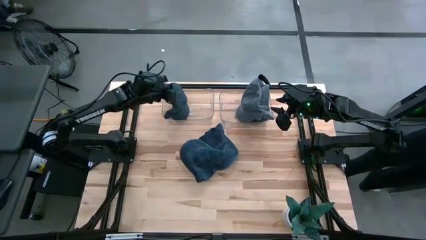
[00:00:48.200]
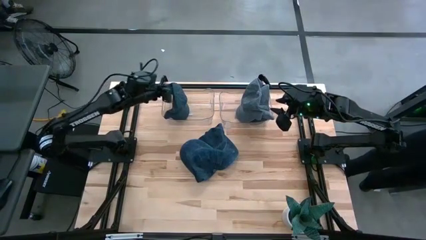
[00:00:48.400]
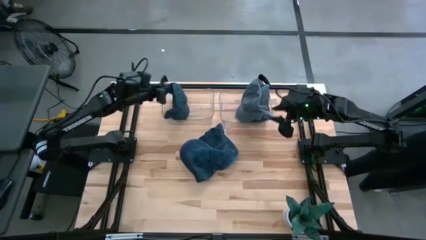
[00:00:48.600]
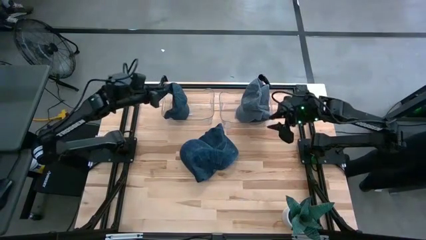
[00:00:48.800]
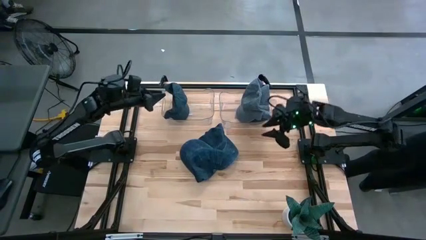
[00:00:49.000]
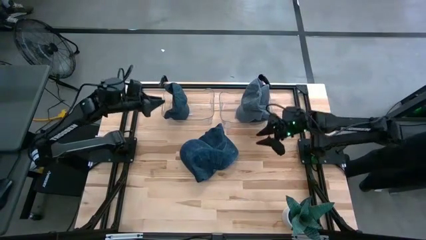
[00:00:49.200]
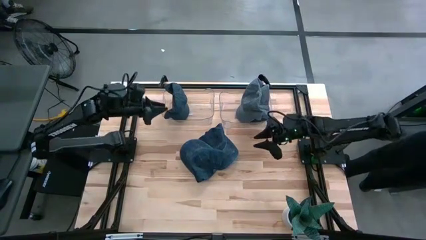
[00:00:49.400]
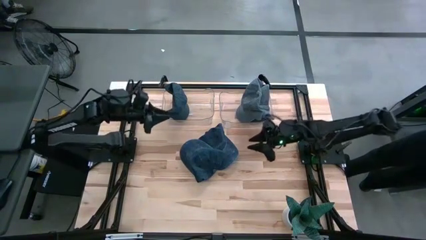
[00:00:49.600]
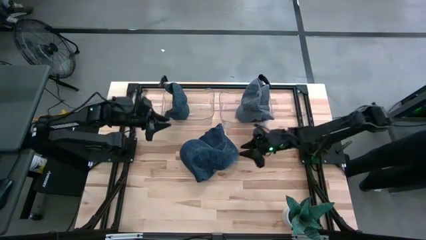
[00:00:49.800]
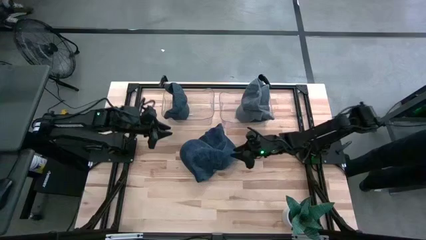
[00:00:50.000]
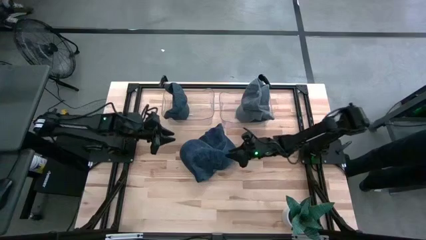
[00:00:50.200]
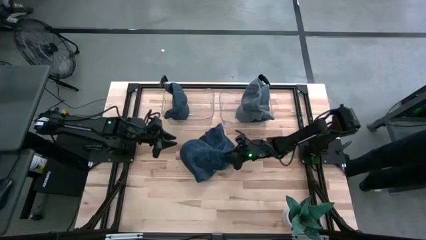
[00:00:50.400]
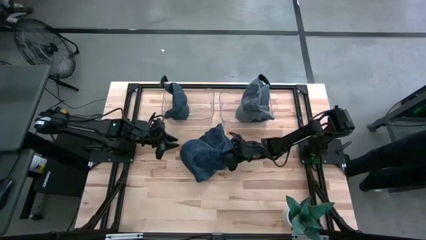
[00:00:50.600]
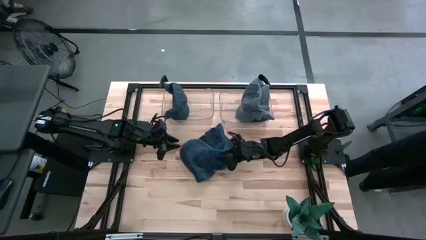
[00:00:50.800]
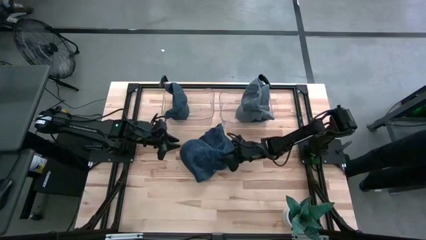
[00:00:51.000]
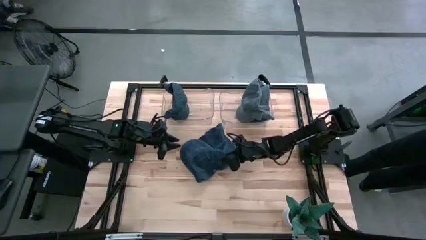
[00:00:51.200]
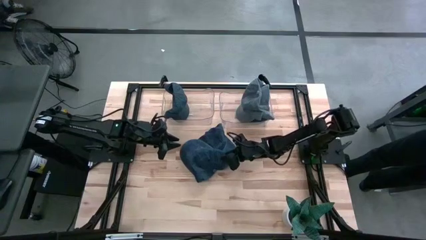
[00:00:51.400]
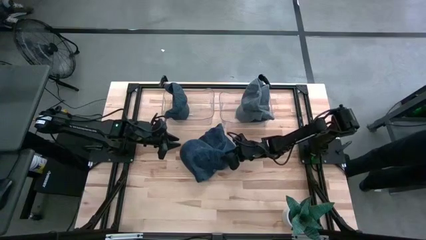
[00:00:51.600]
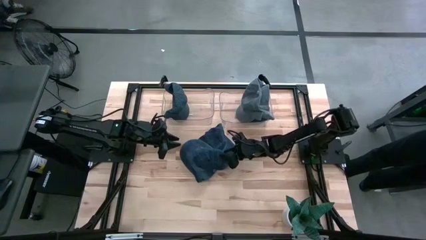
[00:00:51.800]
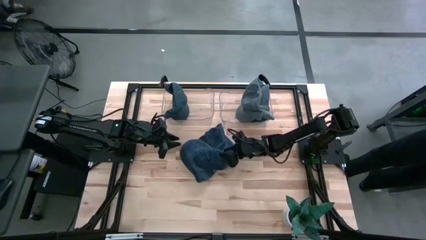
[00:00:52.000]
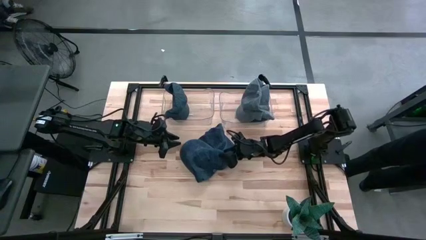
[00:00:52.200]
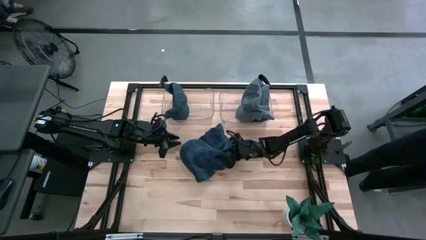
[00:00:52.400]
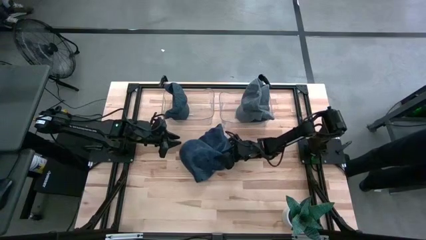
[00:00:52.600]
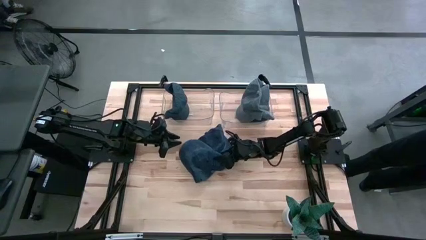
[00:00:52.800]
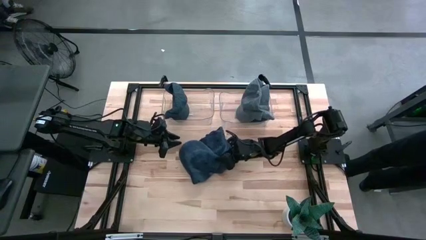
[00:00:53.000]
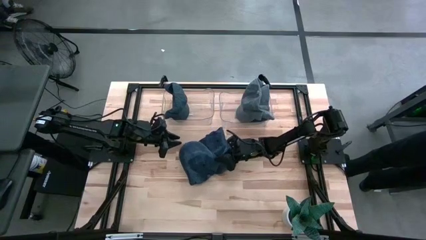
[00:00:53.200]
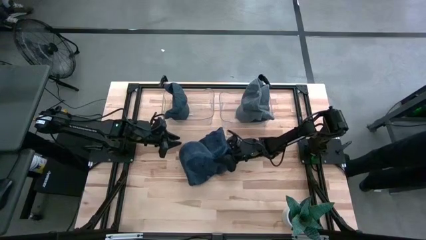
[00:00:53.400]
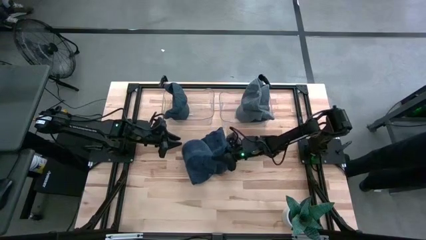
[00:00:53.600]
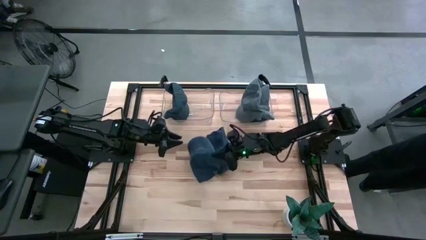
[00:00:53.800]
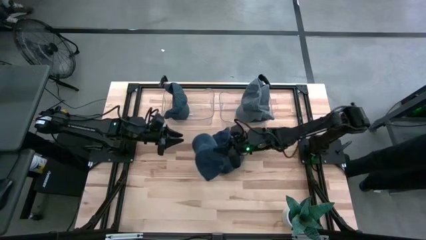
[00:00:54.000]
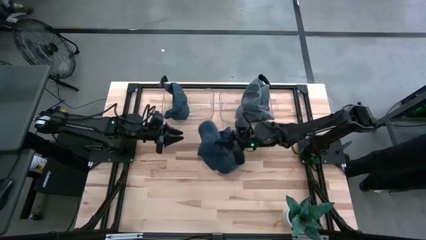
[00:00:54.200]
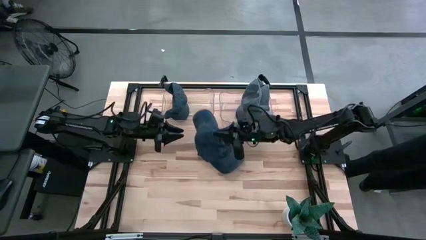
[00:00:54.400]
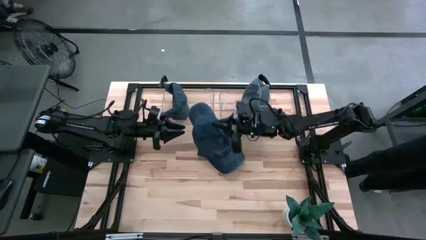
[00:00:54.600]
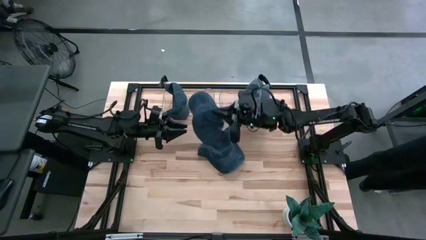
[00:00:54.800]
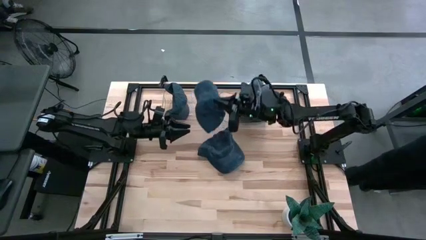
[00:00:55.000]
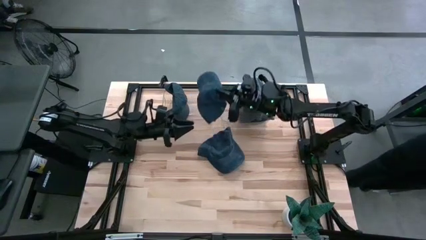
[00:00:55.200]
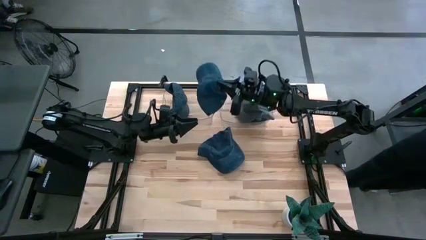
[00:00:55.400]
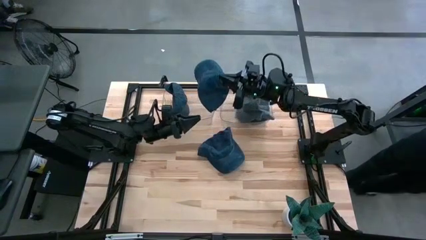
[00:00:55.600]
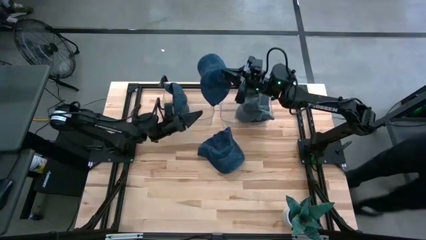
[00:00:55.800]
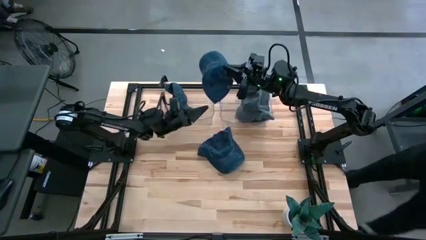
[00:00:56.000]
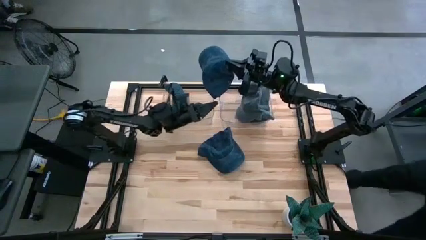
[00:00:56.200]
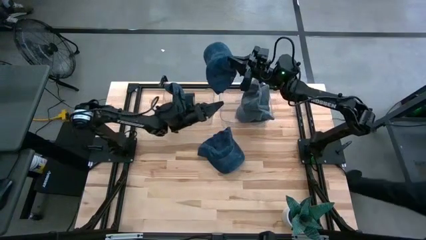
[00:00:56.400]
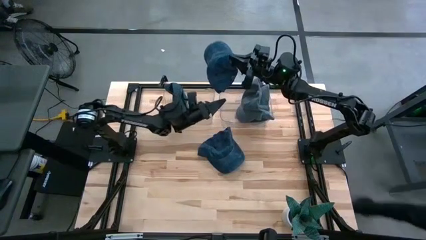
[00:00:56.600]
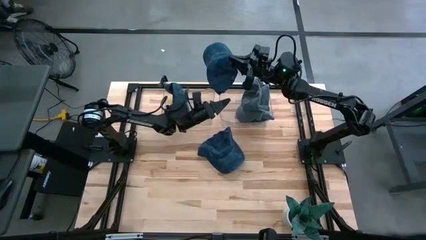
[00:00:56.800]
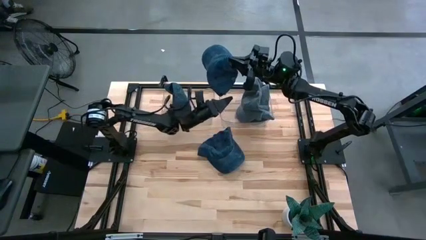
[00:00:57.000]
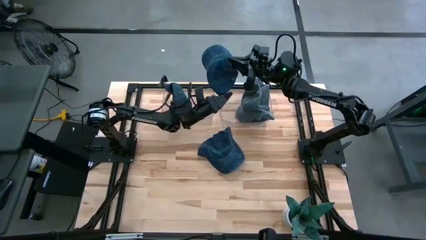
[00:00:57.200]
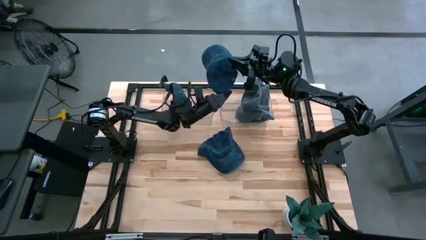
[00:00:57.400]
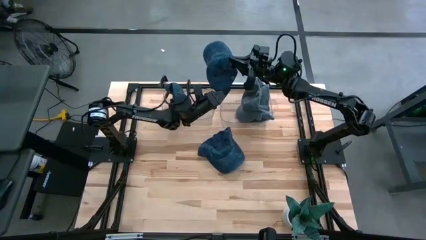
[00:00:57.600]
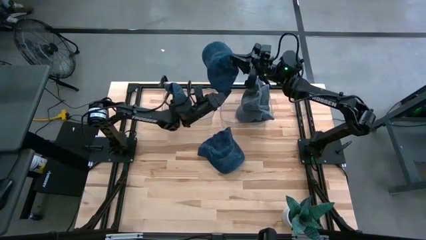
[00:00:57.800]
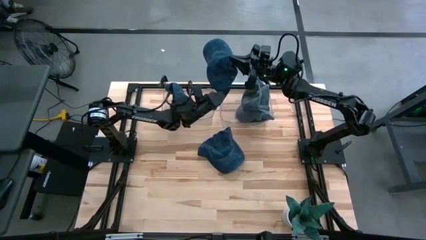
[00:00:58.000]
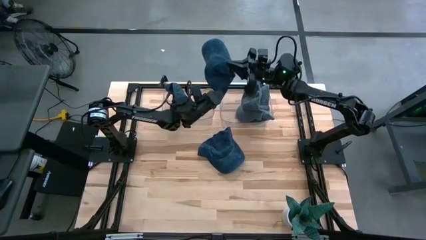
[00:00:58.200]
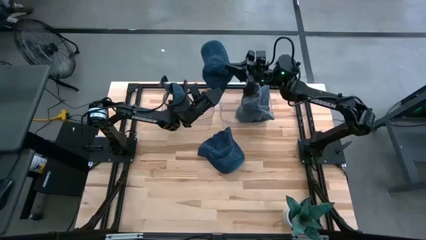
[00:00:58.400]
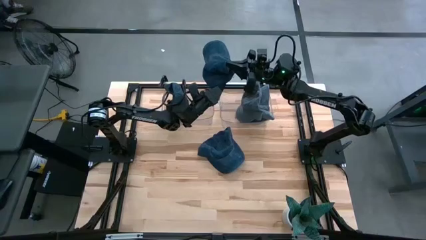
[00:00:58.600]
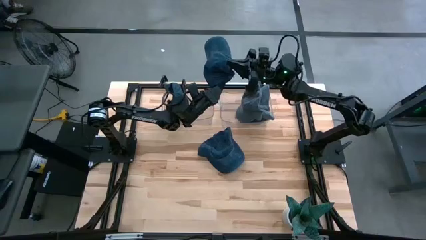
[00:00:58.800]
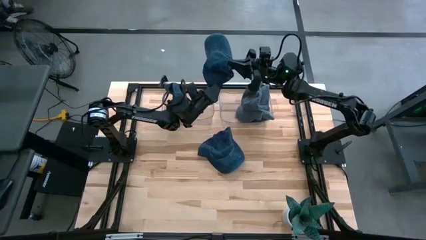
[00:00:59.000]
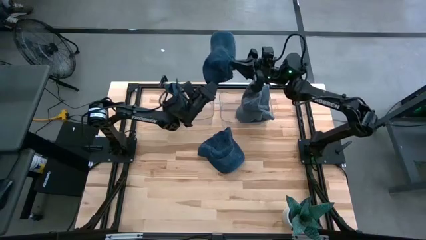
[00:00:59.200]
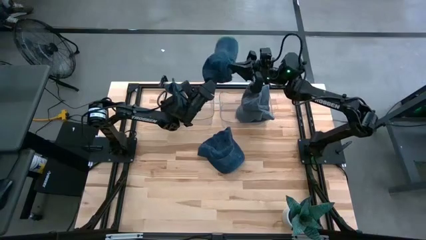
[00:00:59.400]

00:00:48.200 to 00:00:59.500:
Task: Pick & Place hat
Put the left blue cap into the left transparent bin

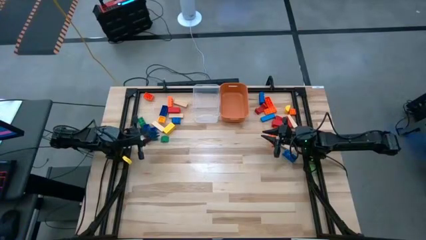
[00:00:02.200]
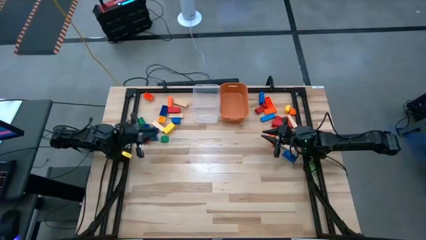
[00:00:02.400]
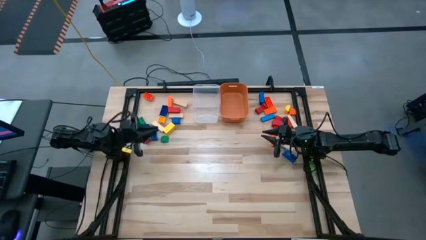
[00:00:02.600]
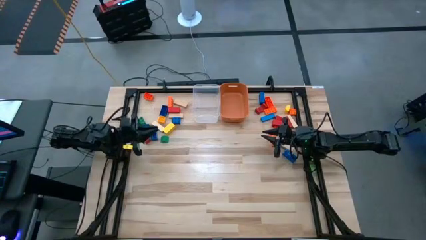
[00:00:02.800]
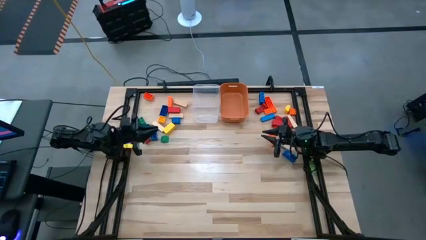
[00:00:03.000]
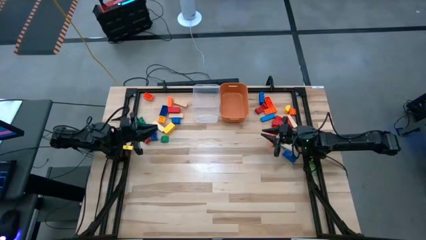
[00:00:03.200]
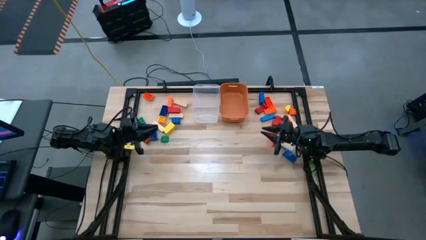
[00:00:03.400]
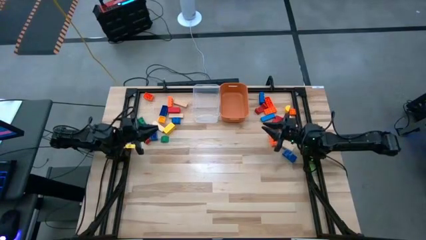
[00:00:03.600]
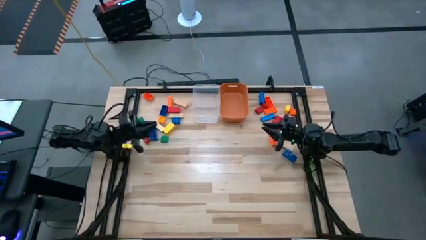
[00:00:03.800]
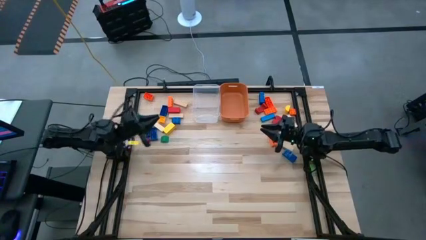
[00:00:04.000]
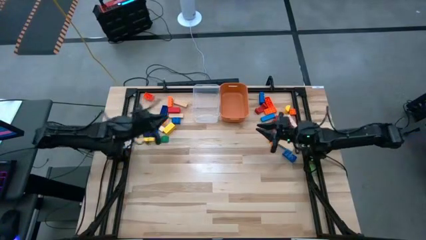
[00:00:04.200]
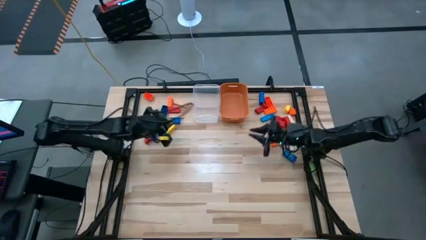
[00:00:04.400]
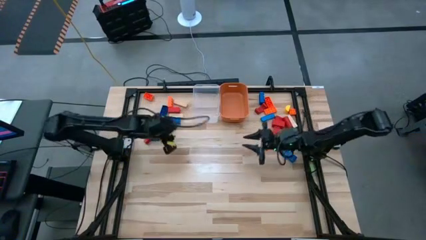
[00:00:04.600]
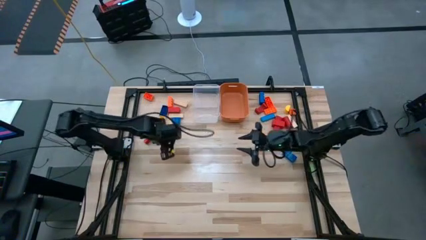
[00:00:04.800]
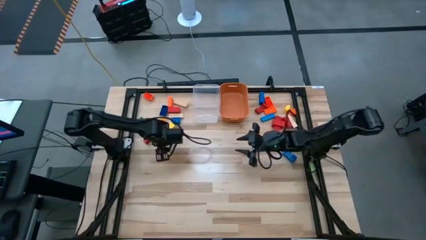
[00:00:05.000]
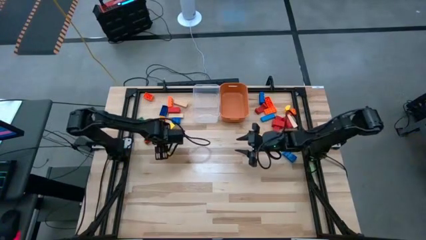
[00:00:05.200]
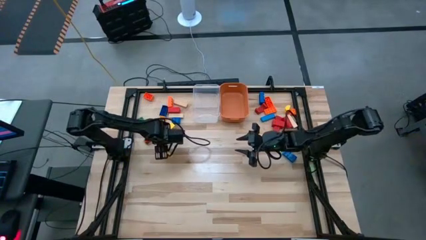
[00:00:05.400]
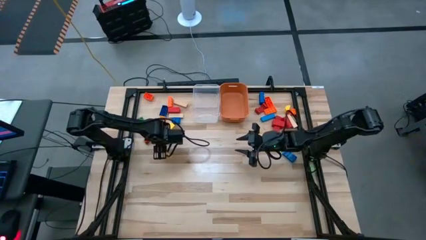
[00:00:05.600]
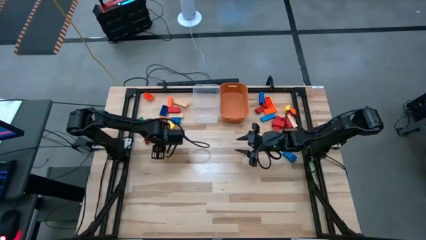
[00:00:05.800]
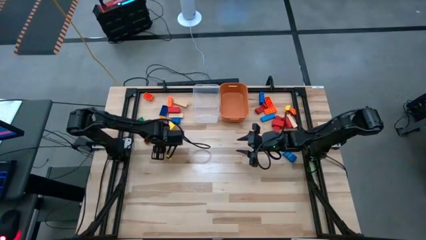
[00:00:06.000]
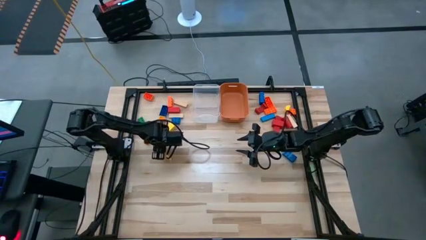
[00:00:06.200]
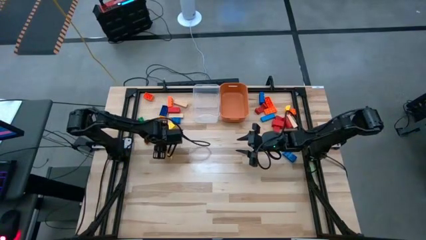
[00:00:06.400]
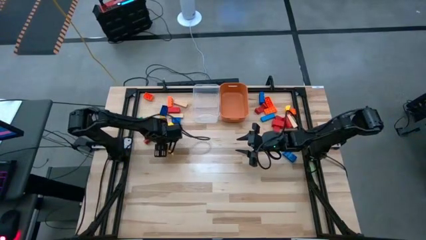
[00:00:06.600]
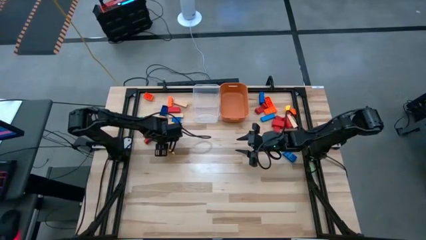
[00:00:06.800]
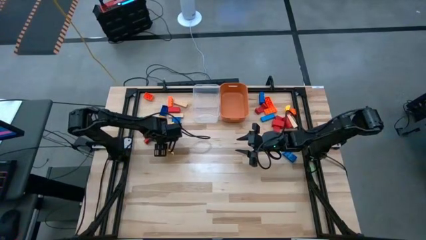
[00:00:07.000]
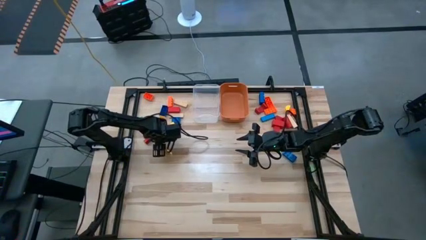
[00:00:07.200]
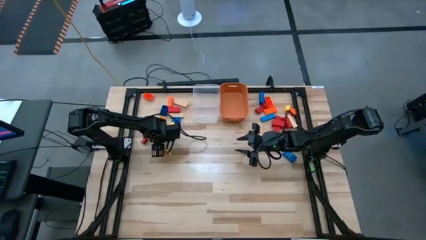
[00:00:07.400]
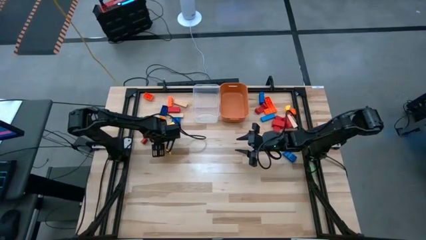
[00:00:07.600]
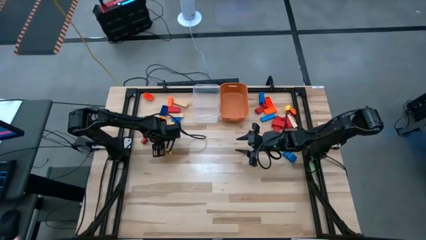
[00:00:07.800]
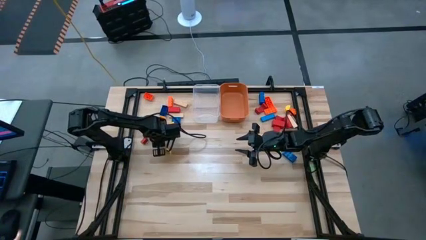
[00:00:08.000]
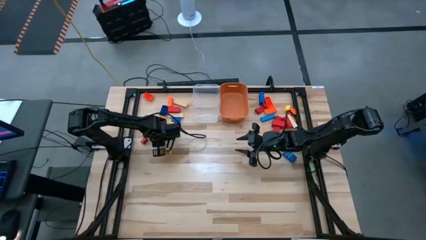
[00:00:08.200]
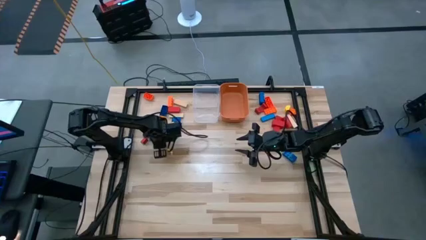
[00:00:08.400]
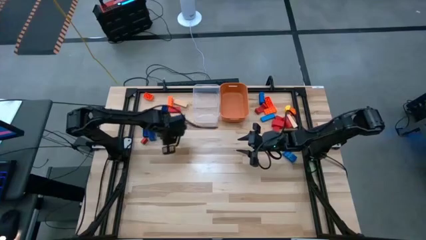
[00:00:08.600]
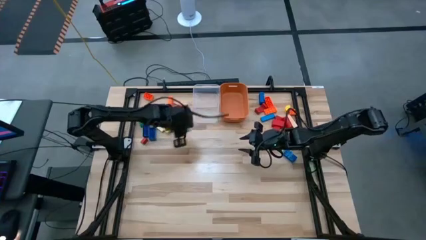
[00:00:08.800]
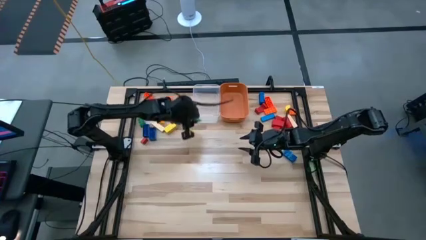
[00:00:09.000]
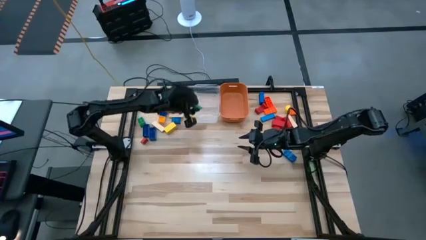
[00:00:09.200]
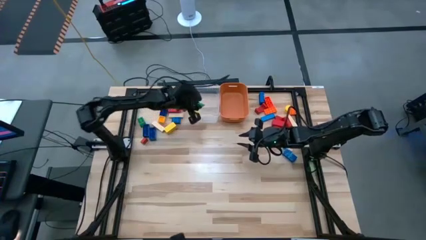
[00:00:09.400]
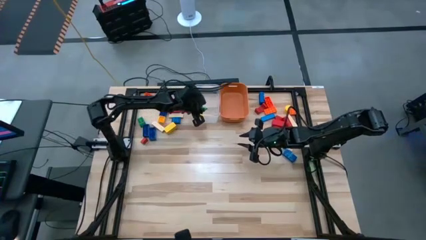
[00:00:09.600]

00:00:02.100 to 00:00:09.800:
Task: Sort blocks by size
Put the green triangle block into the clear bin
